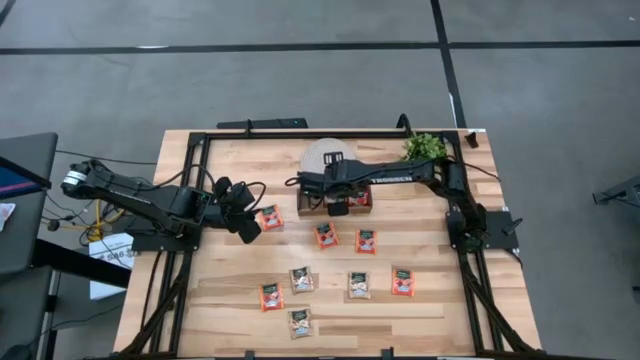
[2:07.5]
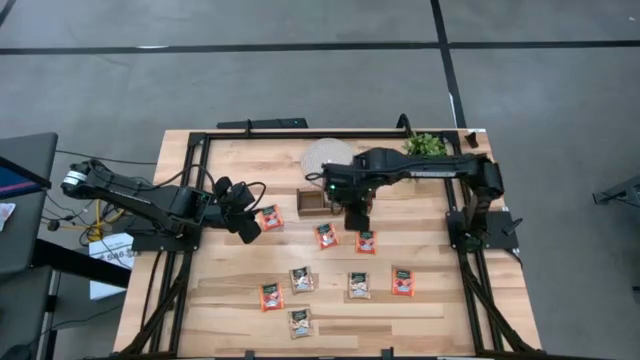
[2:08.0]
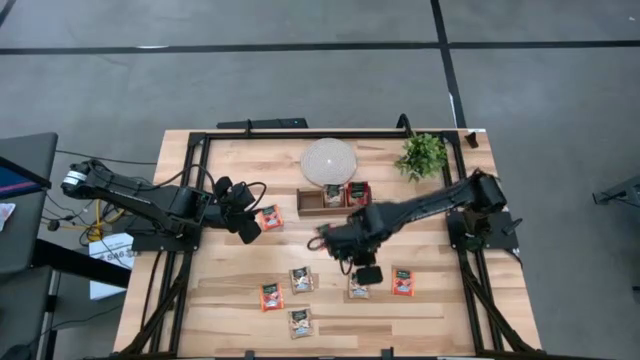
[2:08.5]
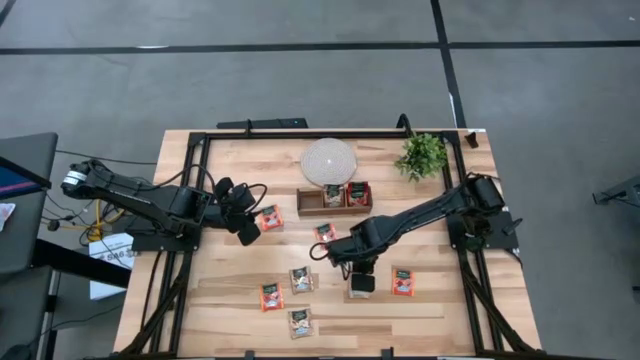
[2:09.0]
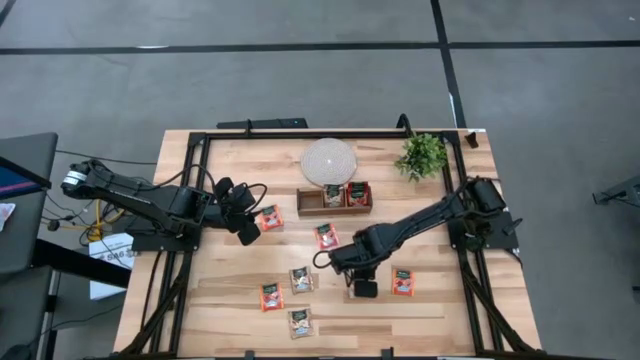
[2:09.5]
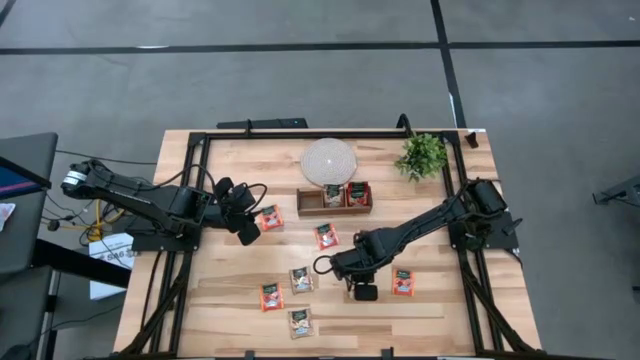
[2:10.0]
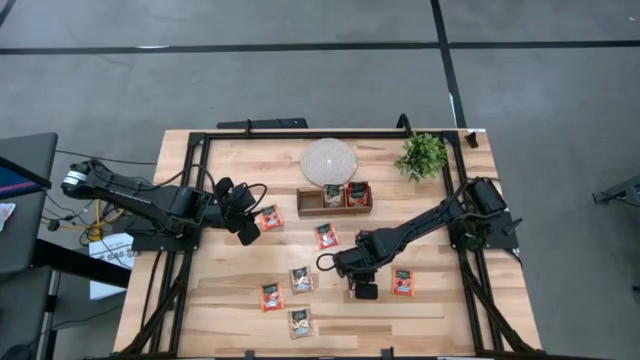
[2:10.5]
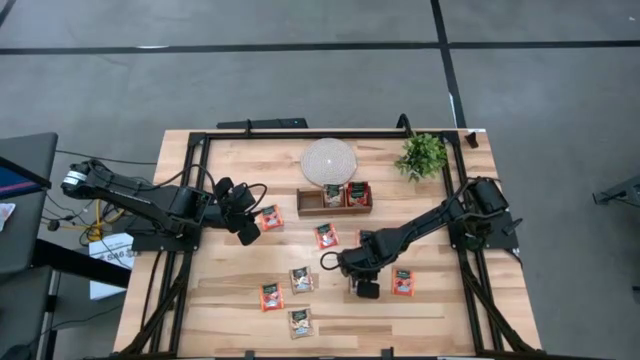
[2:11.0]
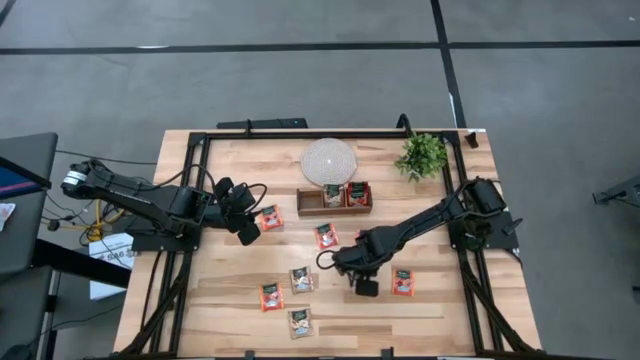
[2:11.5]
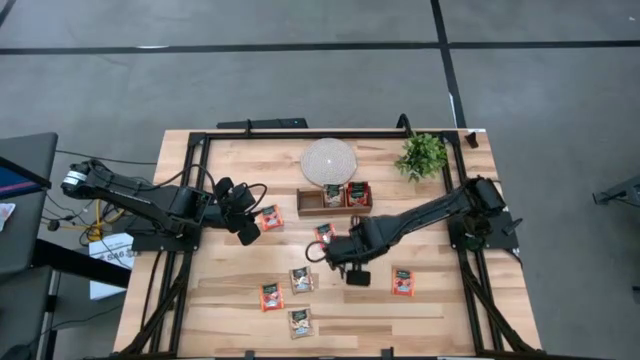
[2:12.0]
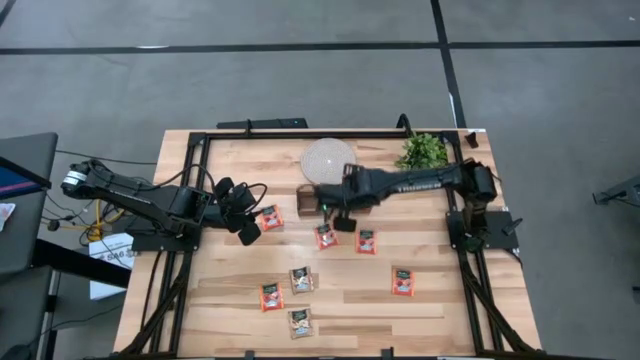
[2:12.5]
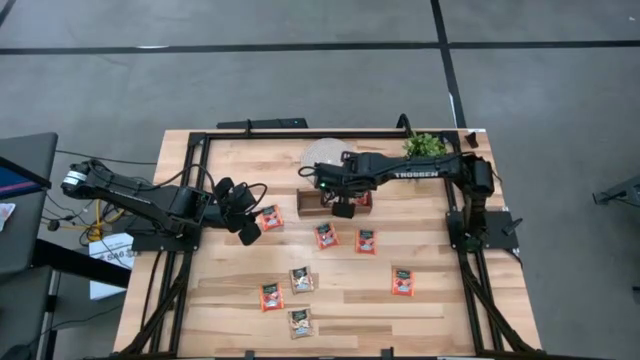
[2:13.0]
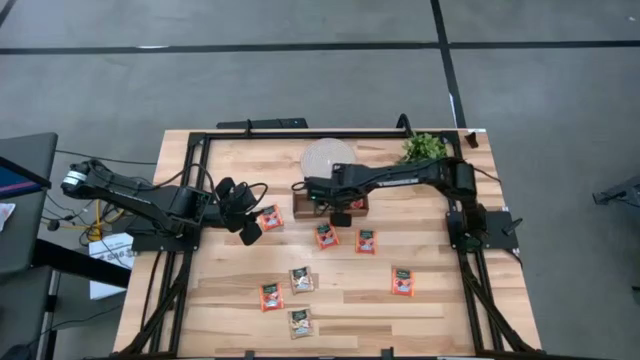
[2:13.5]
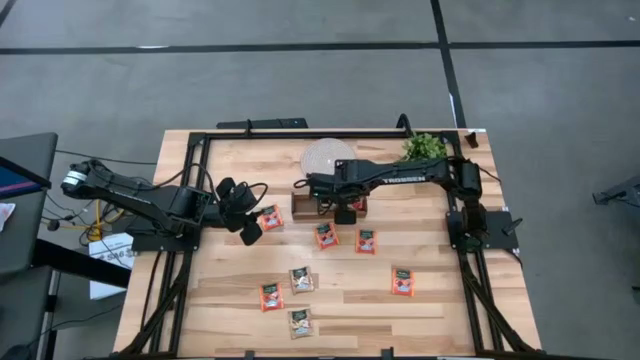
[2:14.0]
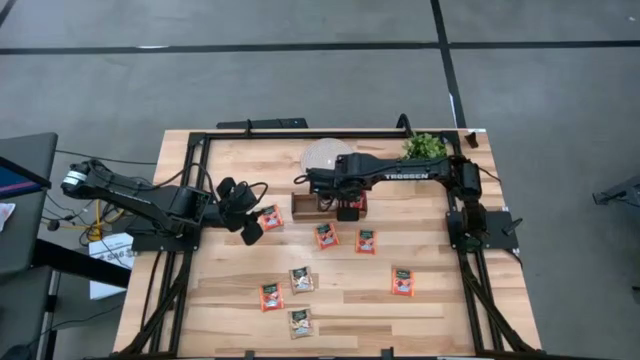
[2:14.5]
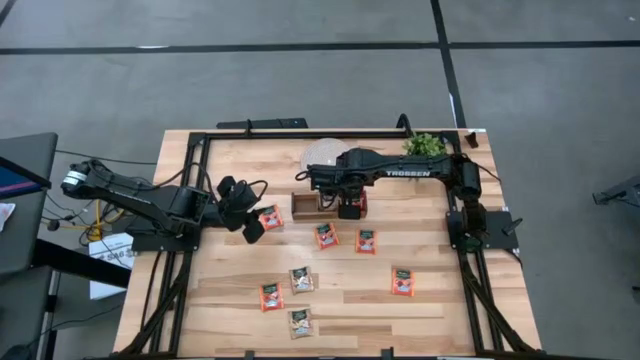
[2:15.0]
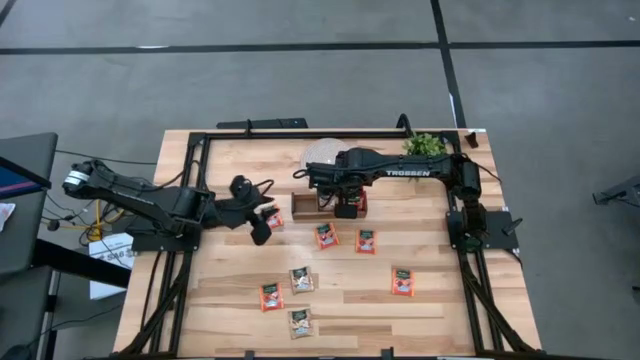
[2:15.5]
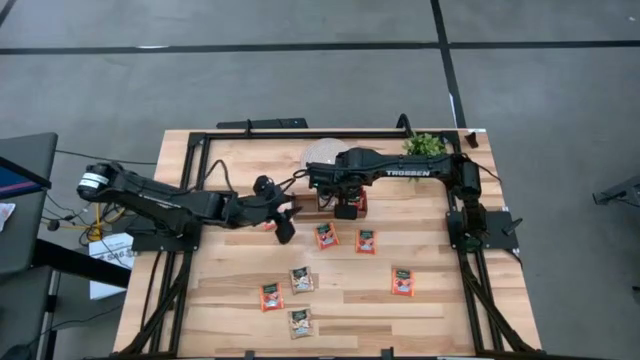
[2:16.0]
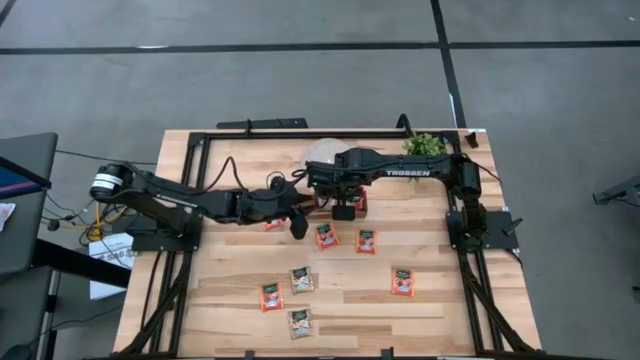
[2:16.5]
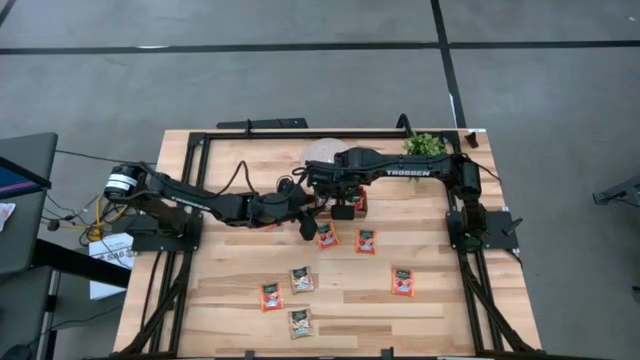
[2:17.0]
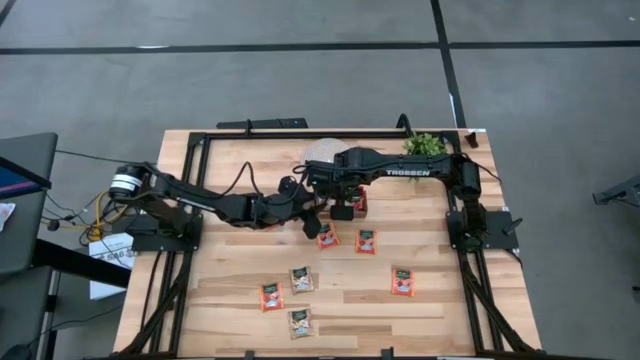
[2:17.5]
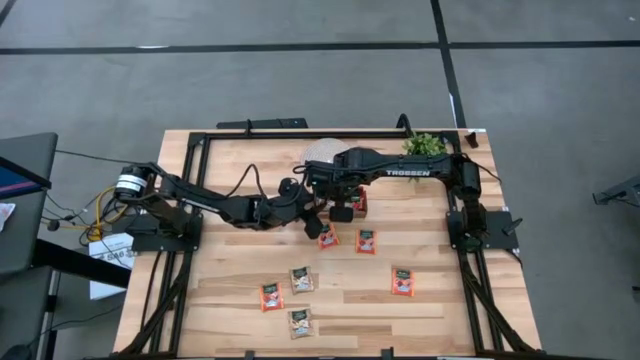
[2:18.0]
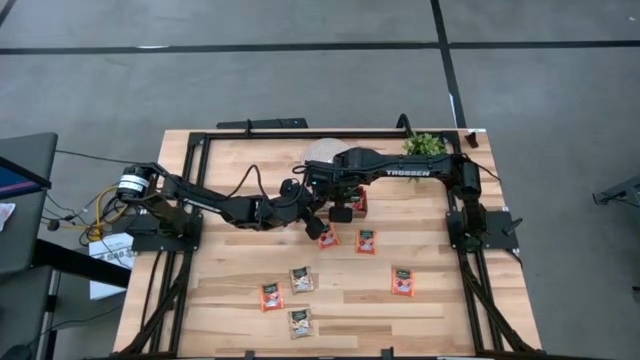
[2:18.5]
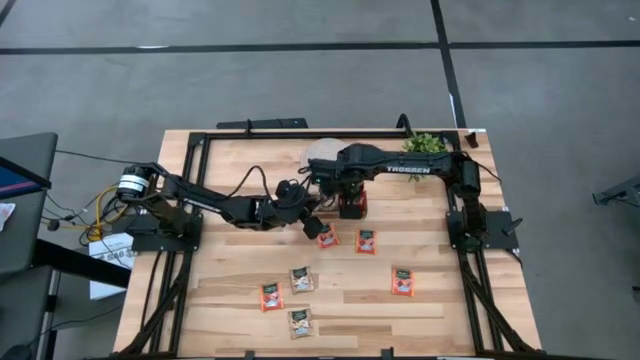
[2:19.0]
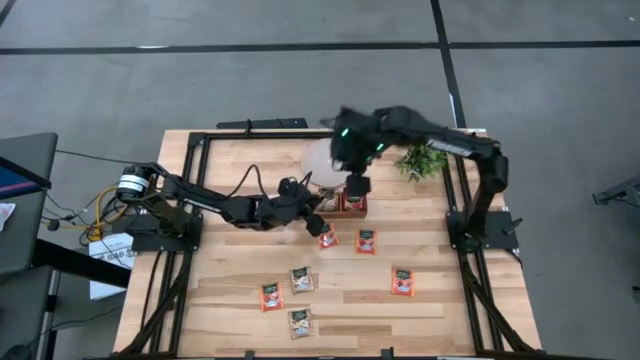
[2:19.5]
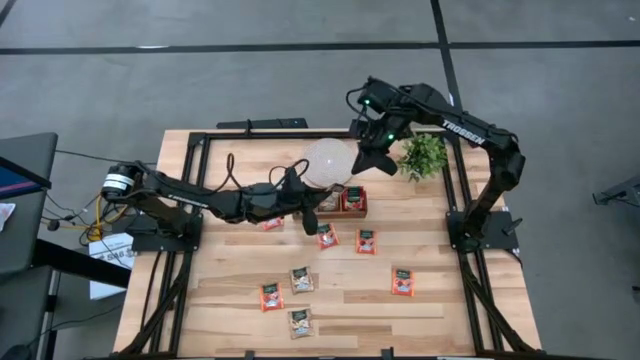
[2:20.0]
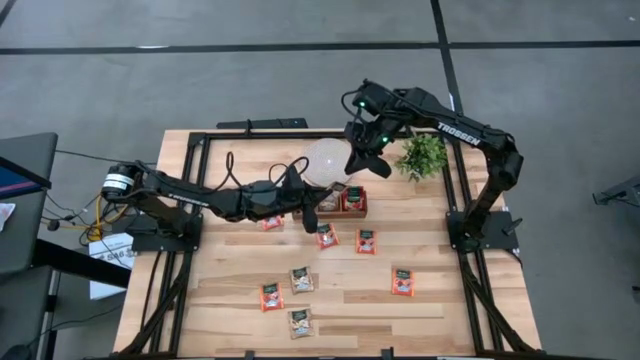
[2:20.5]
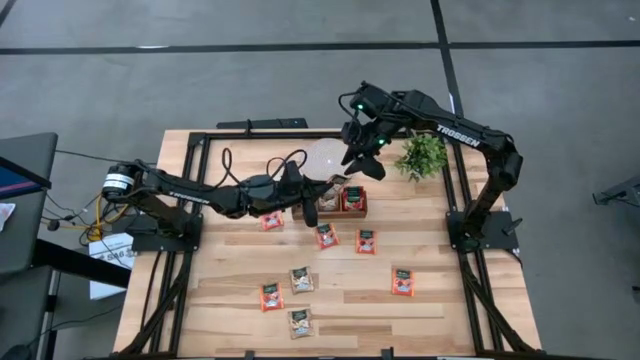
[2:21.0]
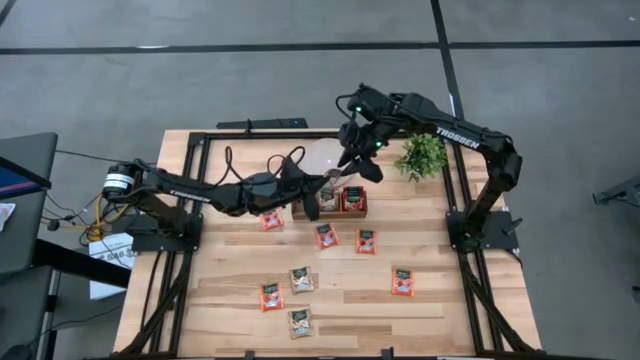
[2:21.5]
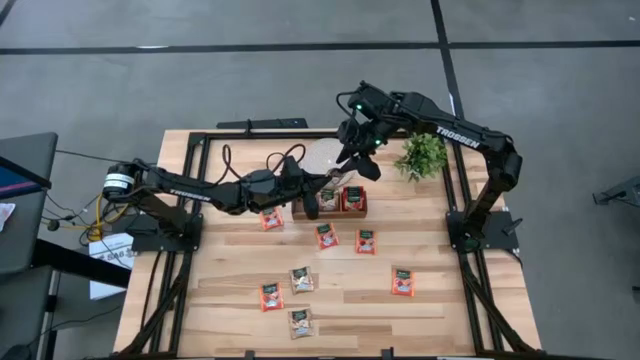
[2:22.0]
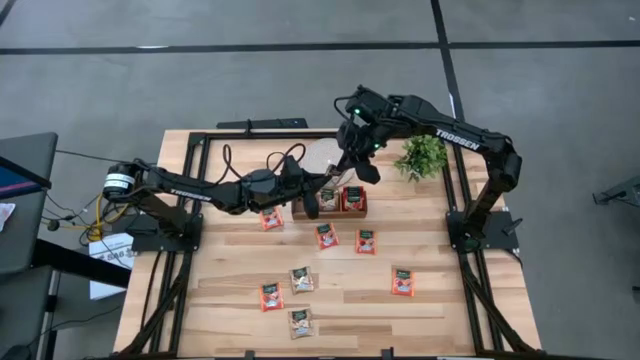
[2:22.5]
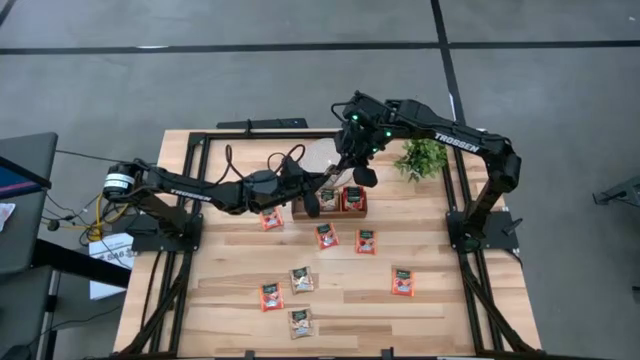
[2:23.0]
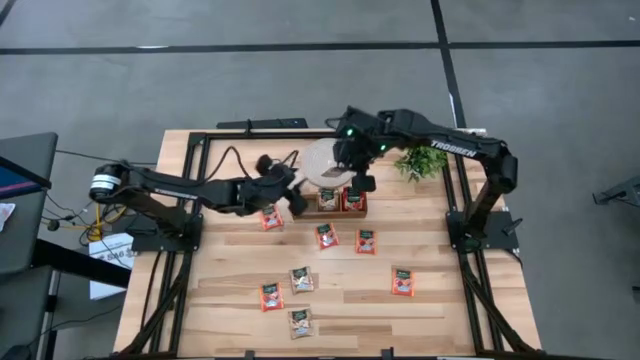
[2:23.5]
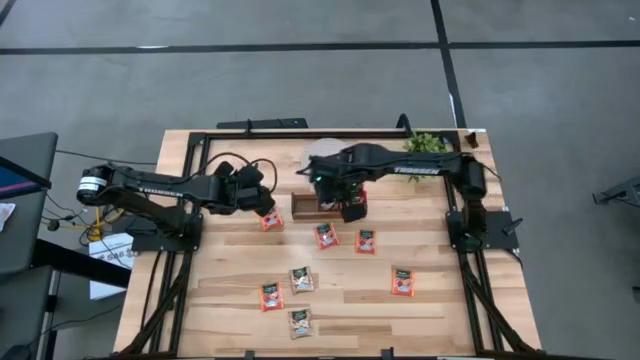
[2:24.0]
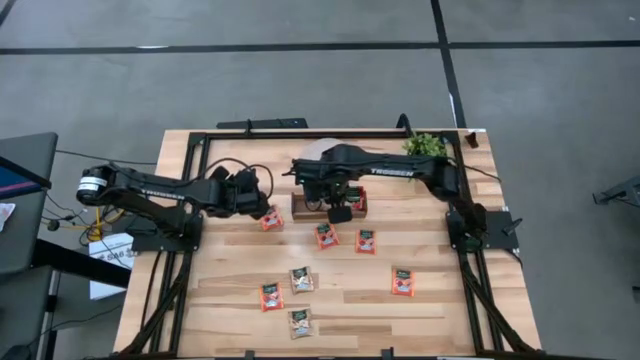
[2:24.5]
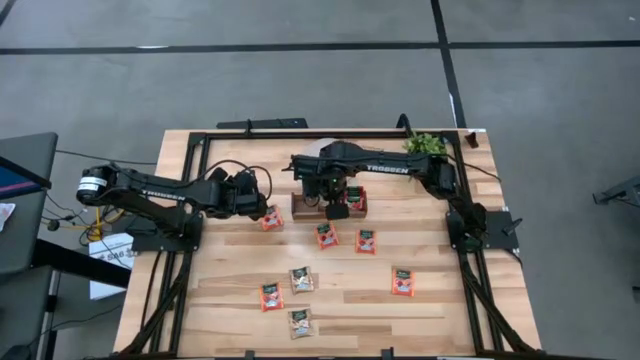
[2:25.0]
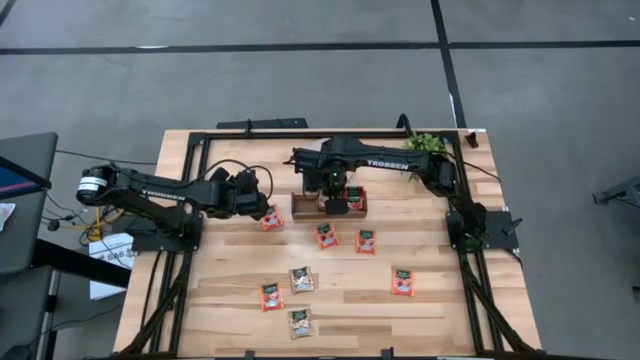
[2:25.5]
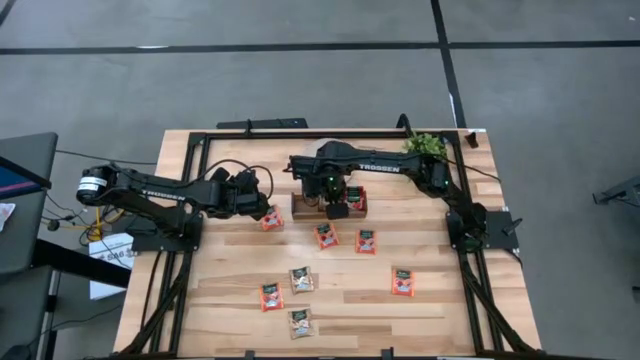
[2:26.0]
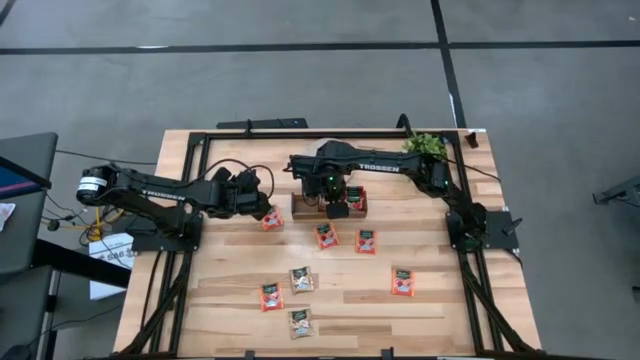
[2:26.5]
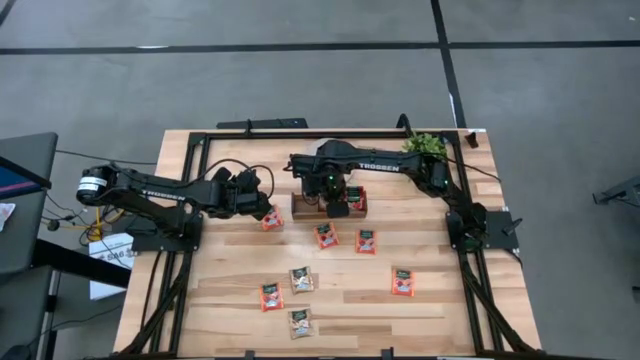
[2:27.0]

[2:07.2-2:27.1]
Task: Pick & Place Tea
Put the top right brown tea bag into the middle slot of the wooden organizer

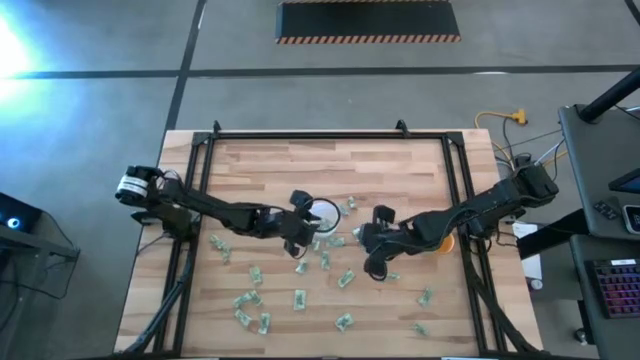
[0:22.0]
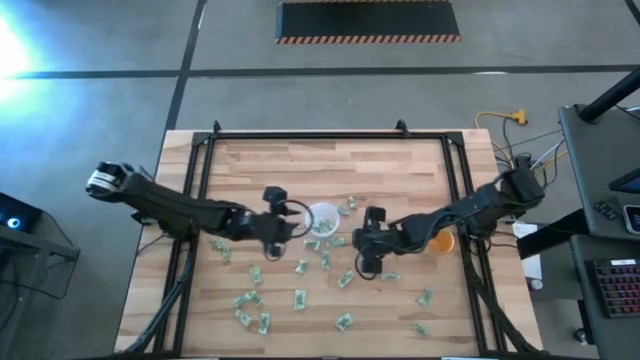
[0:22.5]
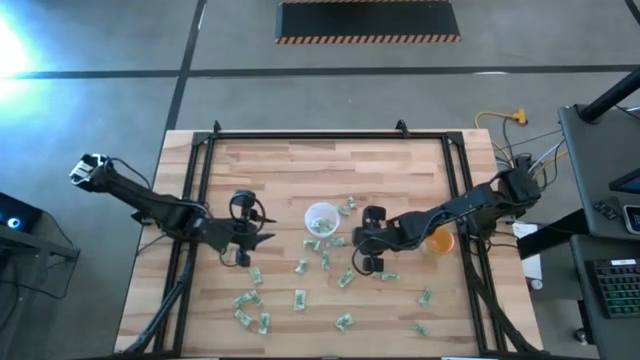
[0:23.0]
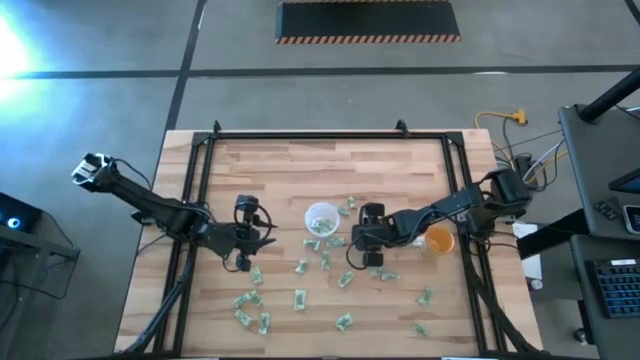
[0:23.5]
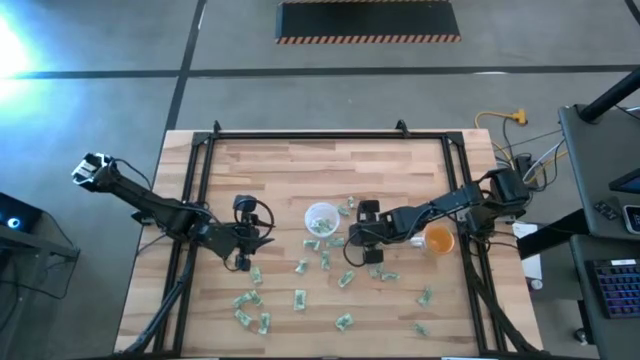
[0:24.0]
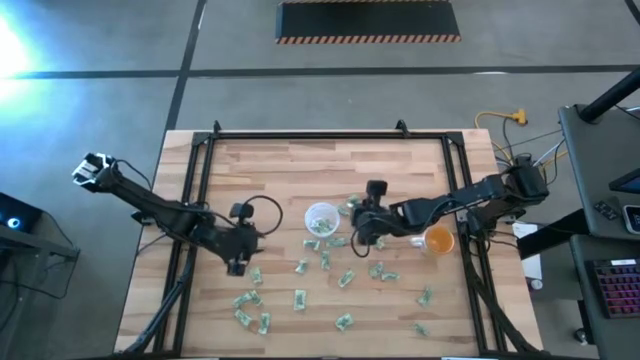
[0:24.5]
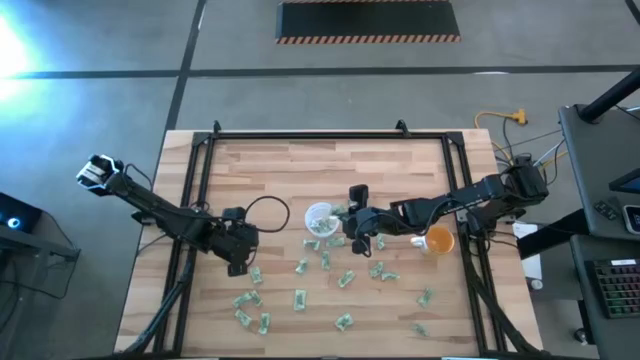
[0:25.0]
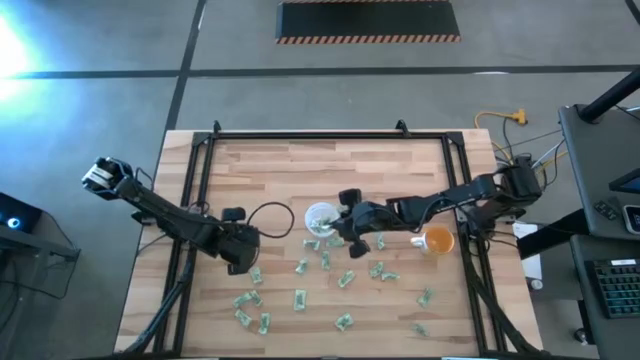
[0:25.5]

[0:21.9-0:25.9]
Task: Pick and place Stevia / Truvia into bins
Put the light green stevia packet into the transparent container
